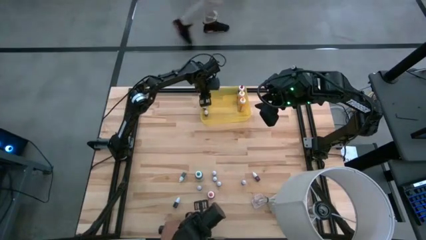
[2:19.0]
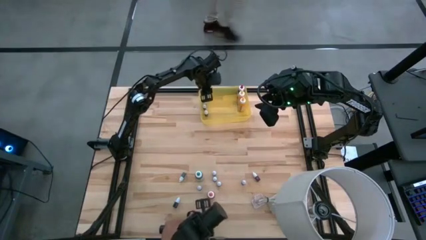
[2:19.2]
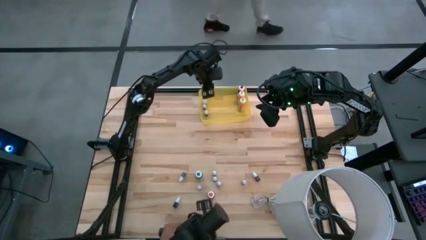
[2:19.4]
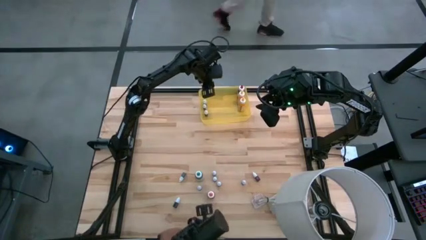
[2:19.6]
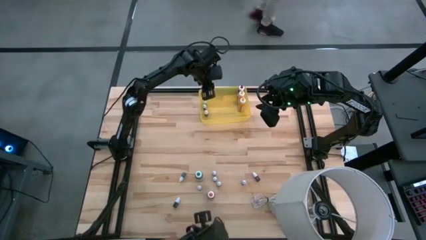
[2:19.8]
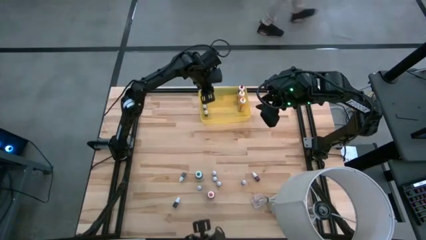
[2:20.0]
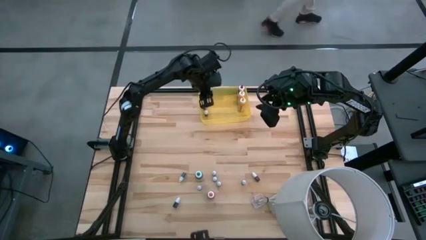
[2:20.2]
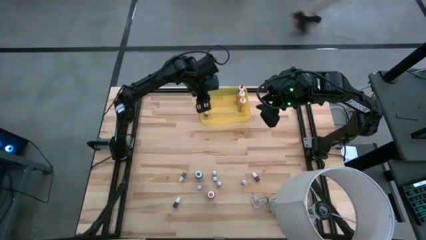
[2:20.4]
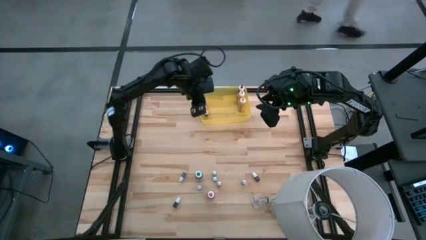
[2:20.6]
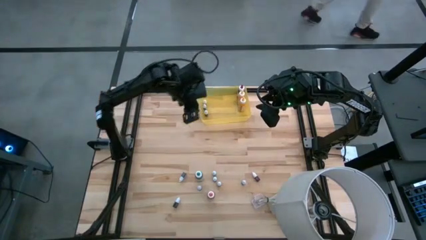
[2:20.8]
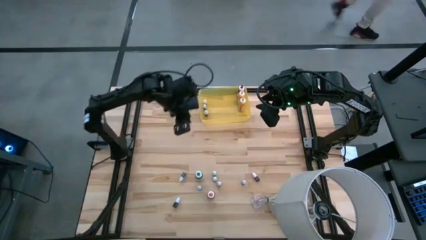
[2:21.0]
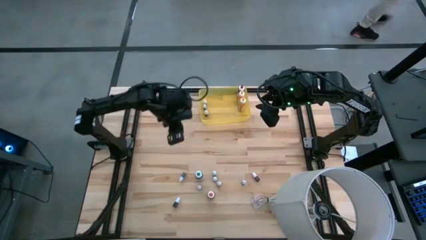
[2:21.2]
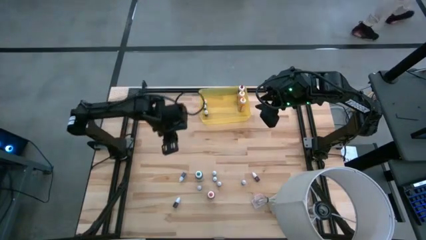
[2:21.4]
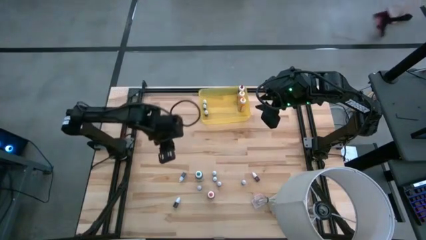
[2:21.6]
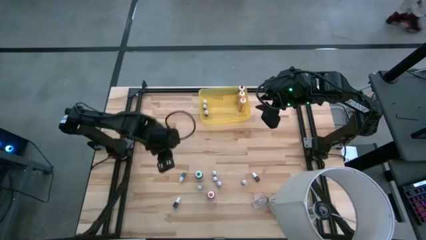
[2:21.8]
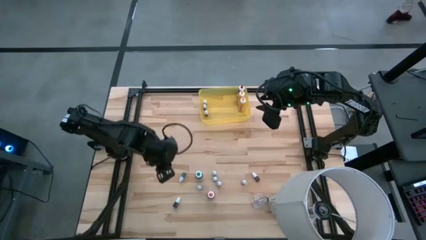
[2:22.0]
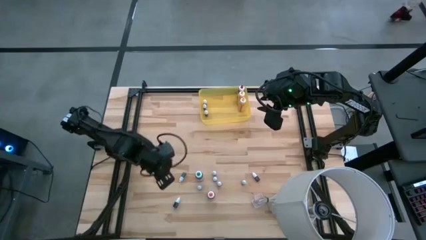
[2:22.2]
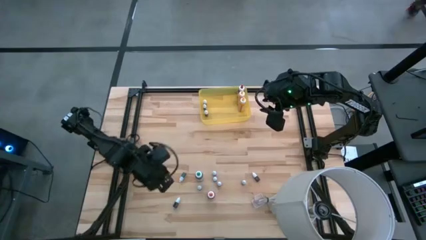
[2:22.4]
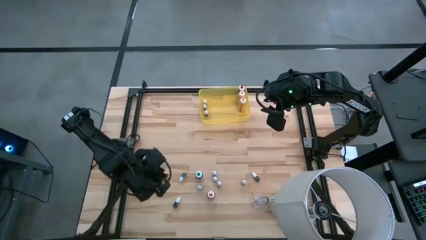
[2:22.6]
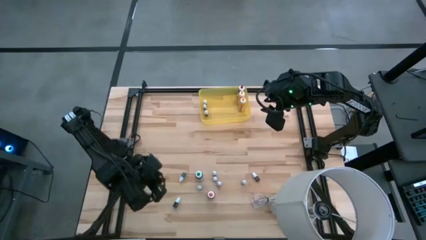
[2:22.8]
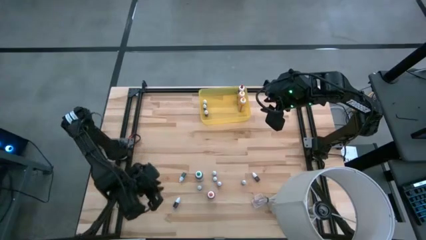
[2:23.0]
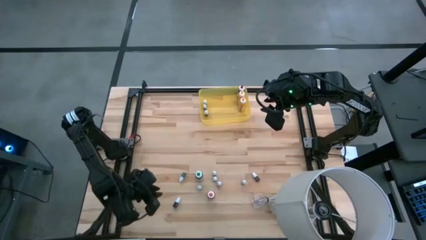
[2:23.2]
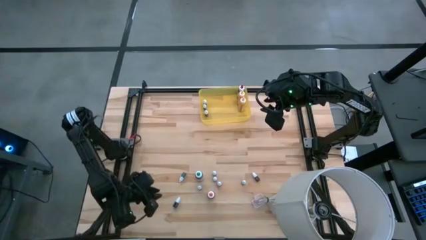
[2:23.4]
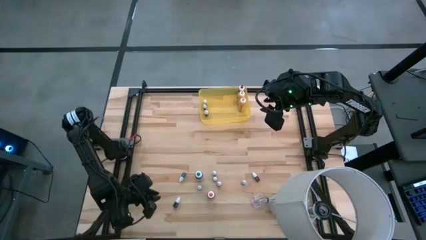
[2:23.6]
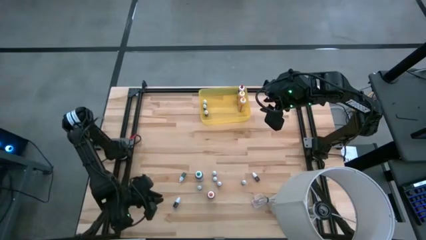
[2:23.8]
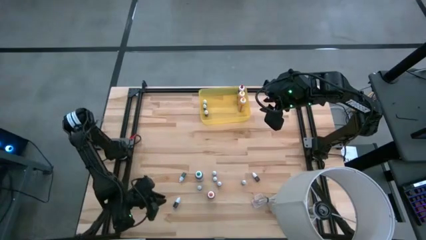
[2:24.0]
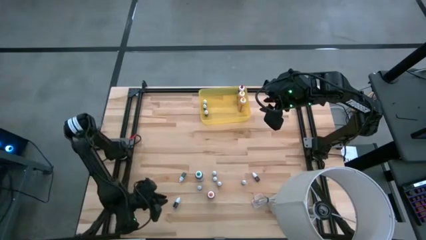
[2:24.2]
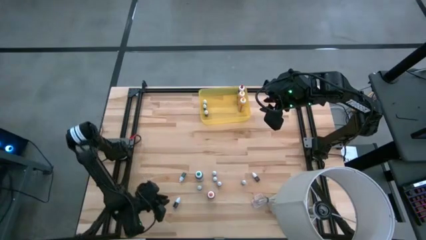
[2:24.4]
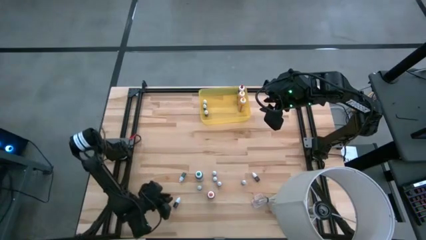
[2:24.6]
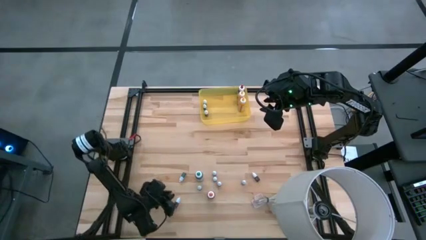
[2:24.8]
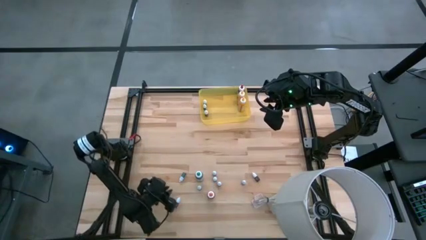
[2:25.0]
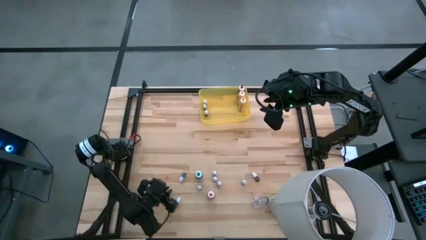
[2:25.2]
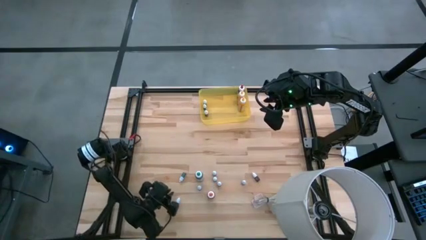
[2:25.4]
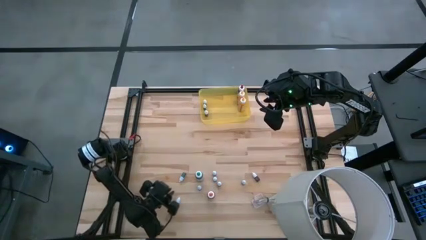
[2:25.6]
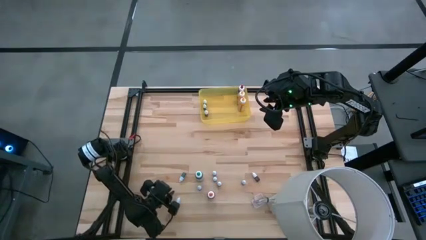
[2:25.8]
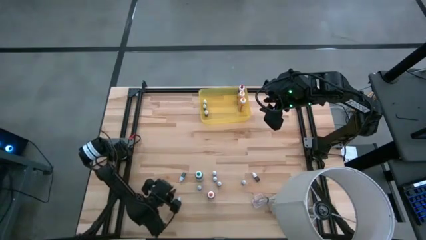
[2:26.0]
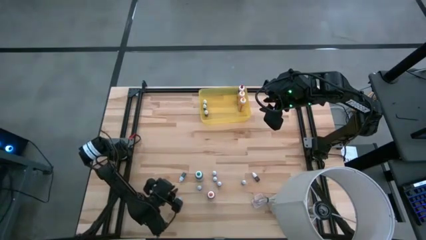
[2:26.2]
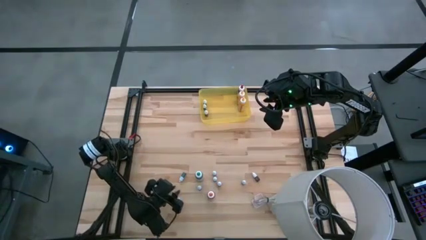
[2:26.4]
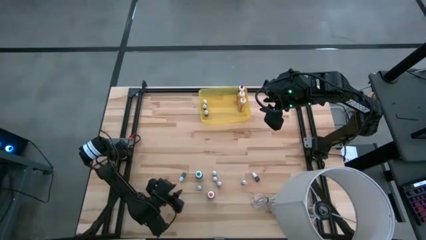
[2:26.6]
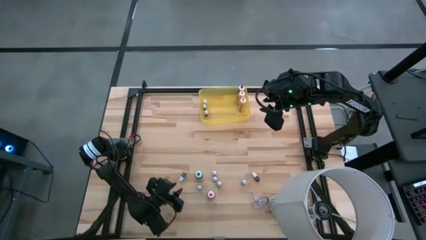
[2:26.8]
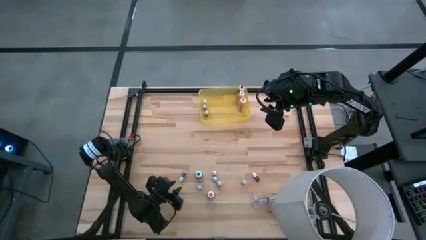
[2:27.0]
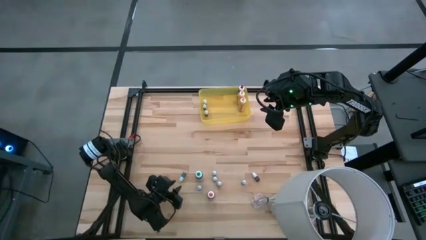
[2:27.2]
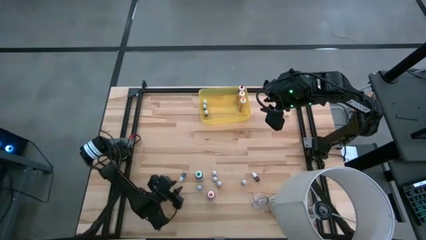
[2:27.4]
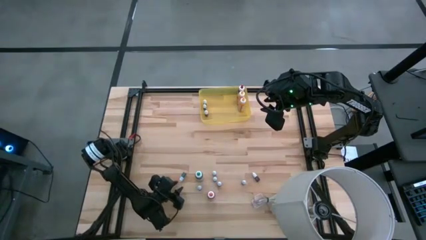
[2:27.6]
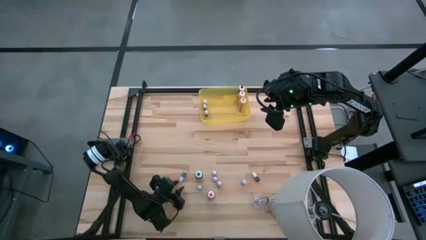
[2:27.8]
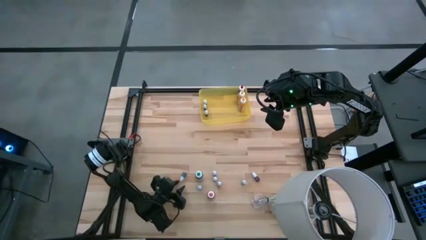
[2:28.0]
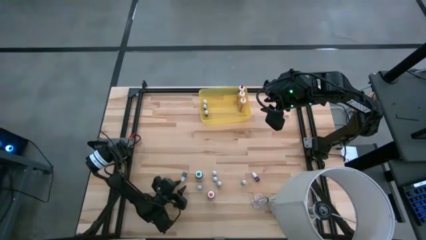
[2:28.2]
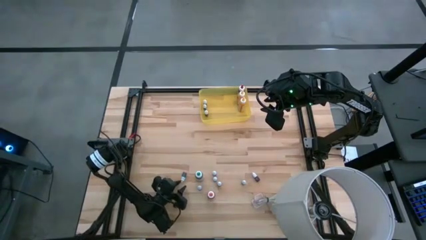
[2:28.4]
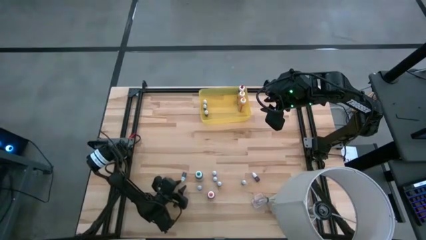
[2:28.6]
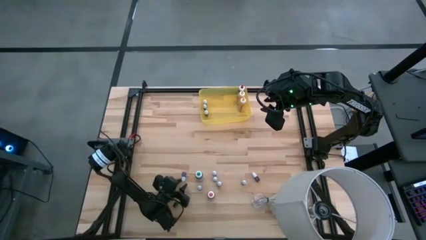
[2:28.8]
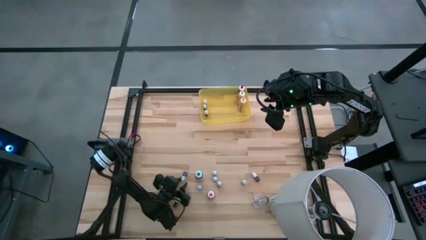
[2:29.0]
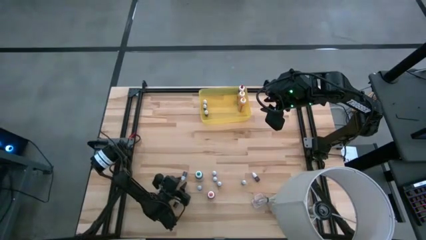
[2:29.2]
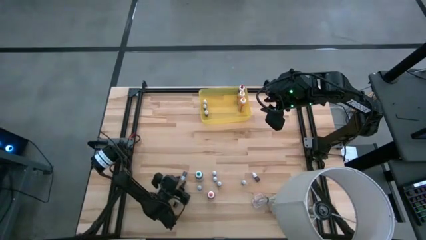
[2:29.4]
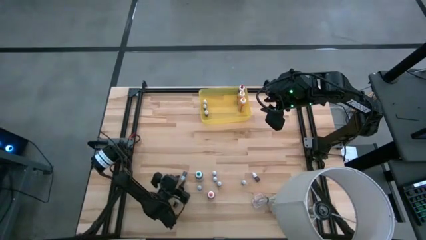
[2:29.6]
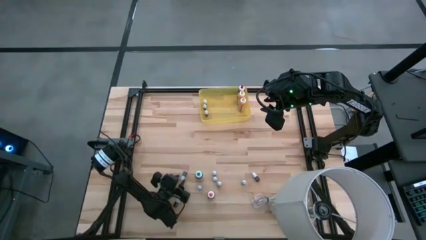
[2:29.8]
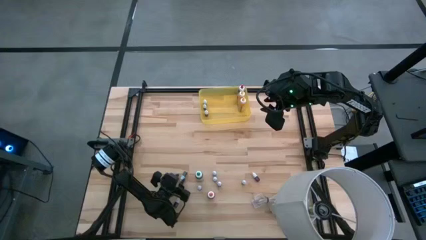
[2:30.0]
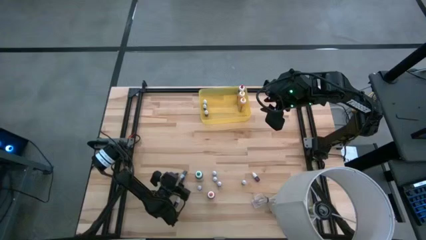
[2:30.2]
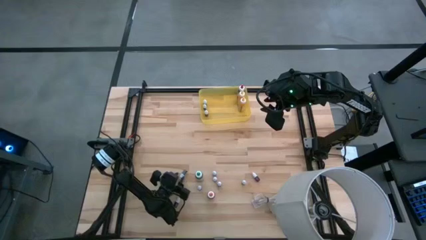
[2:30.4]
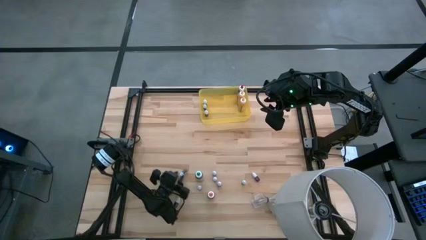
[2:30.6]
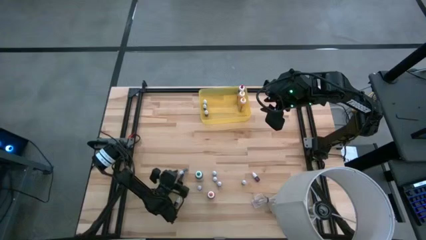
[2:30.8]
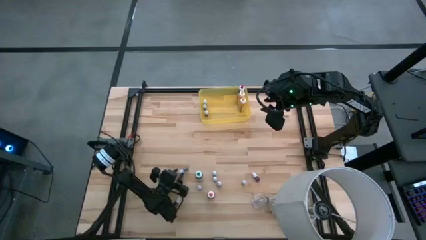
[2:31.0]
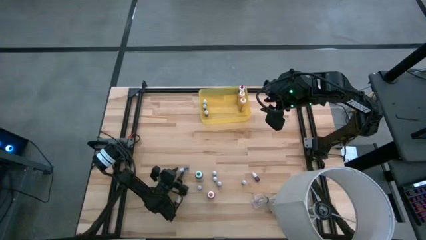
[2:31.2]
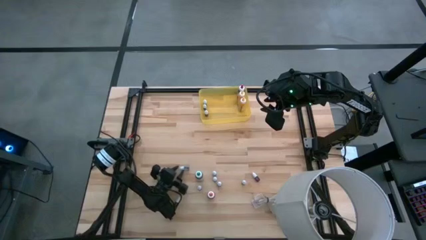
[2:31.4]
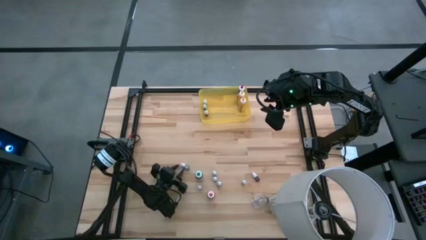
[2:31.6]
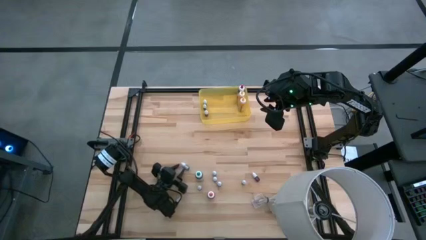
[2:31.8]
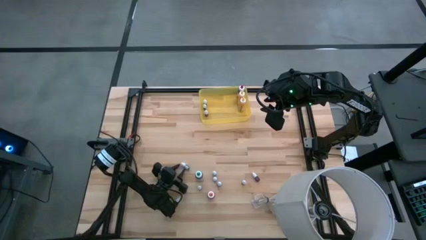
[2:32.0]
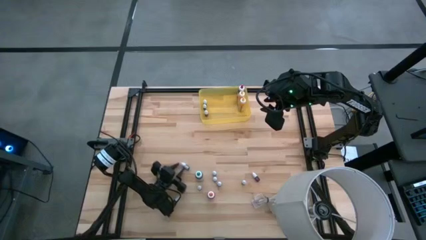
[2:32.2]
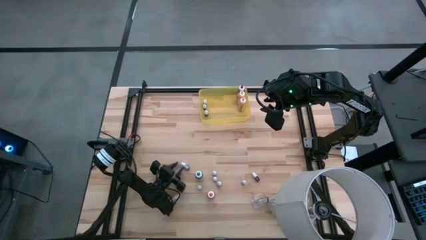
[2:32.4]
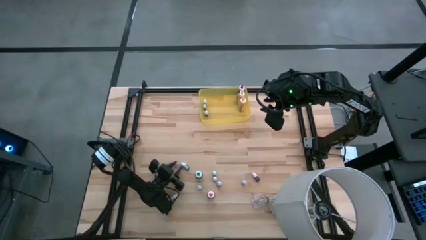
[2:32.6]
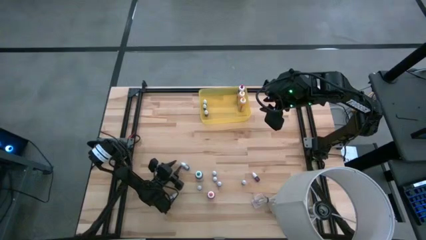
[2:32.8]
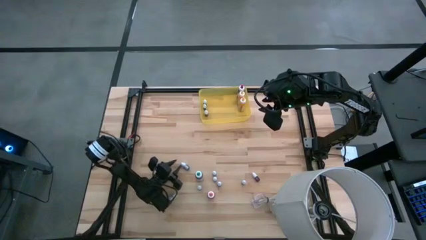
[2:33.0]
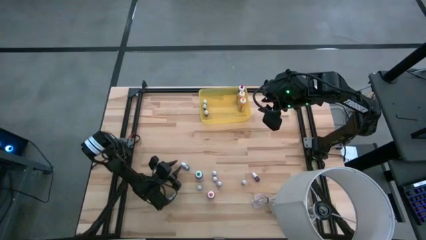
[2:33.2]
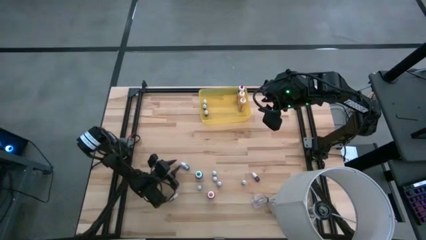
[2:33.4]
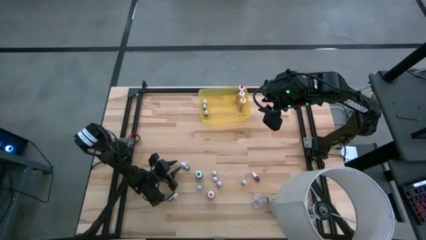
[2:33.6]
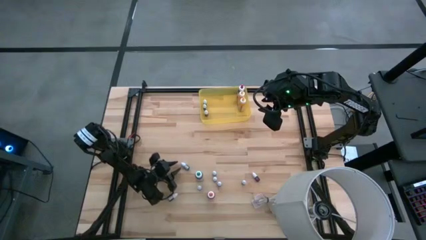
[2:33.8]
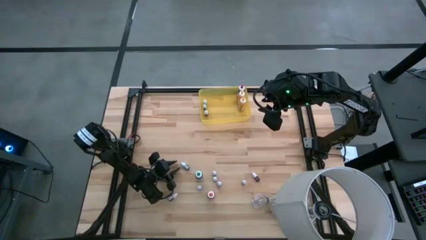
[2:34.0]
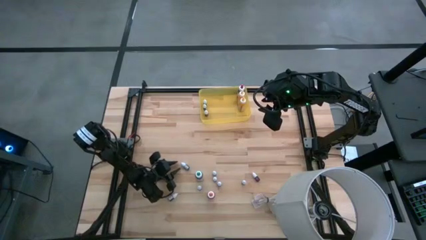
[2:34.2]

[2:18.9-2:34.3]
Task: Pick & Place food coloring
Put the left small green food coloring bottle into the yellow bin
